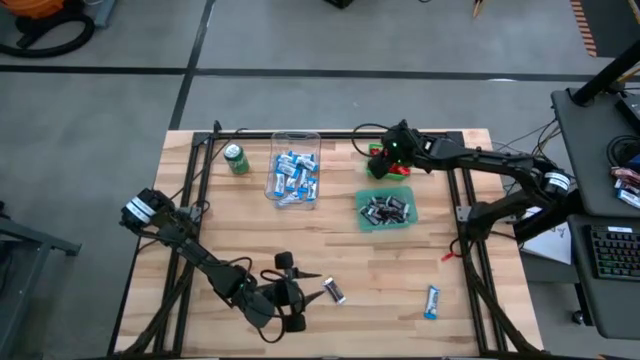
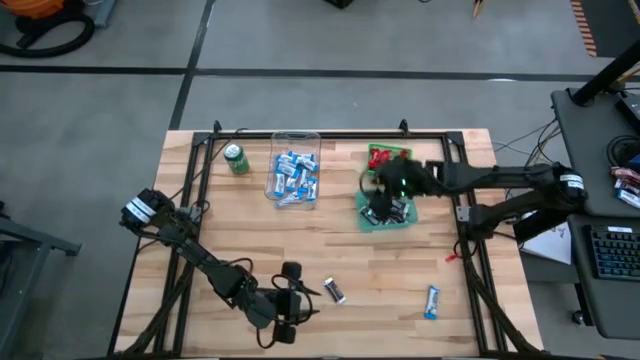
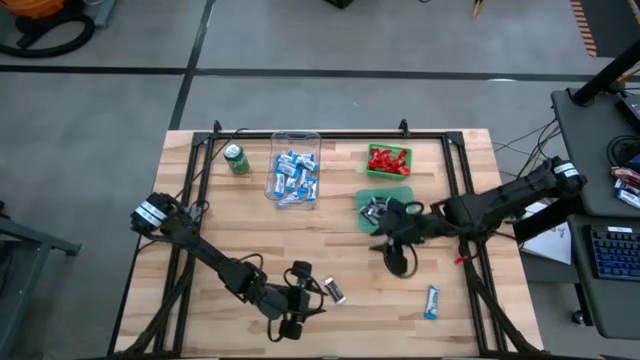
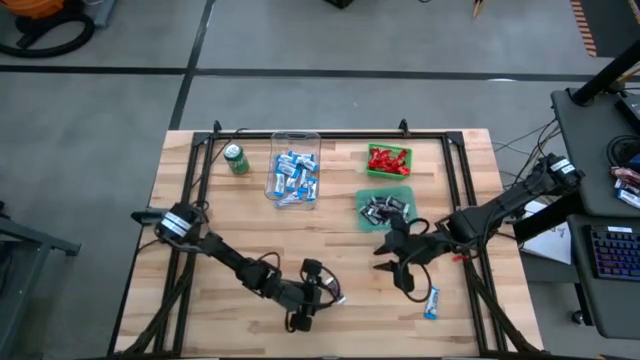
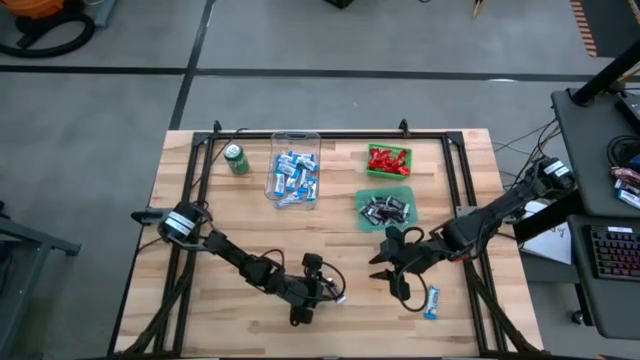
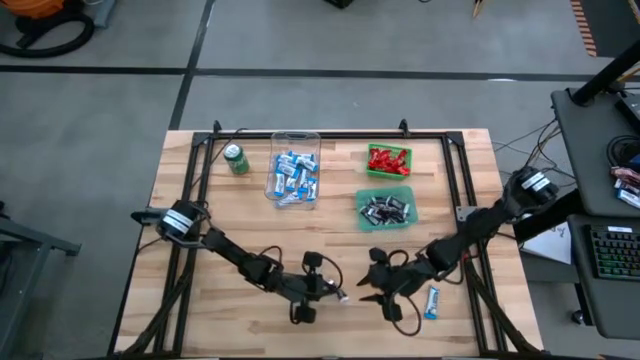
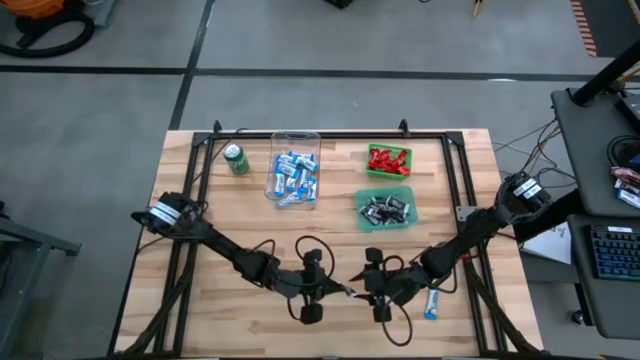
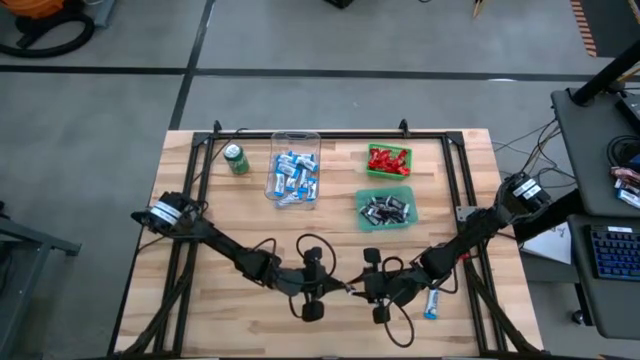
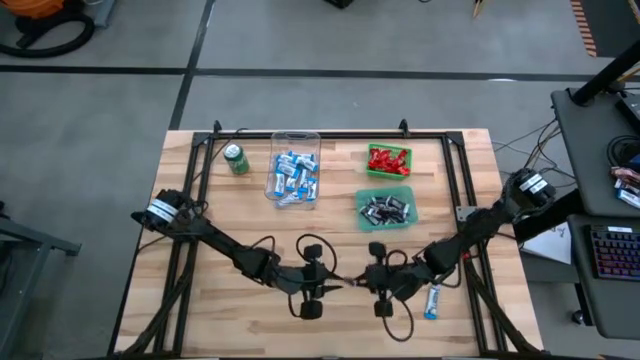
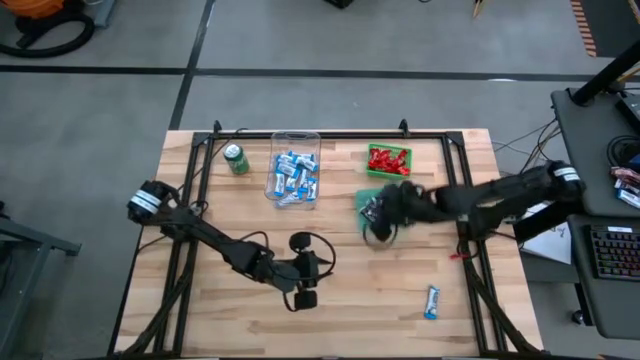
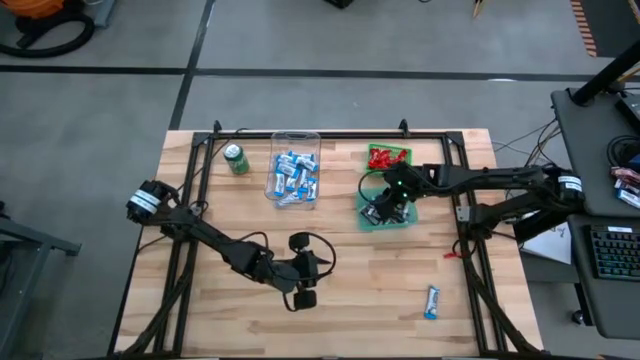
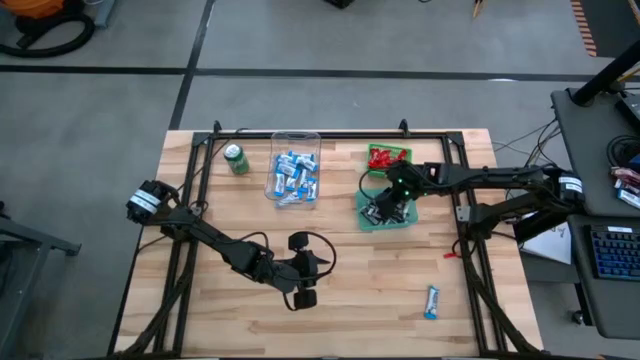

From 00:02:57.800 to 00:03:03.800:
Task: Sort candy
Put the brown candy into the blue bin

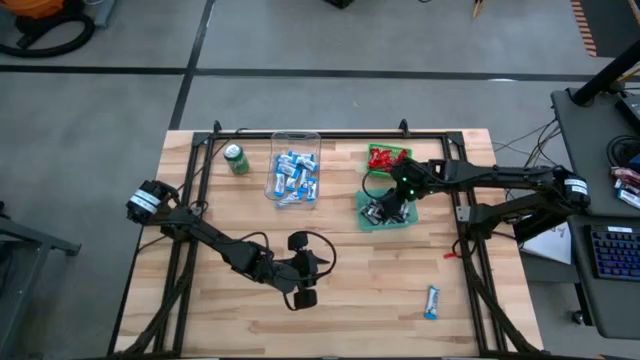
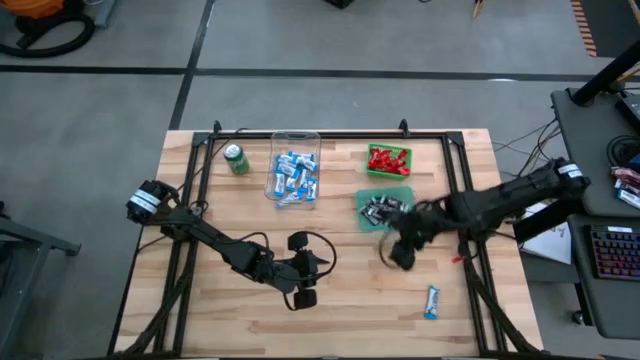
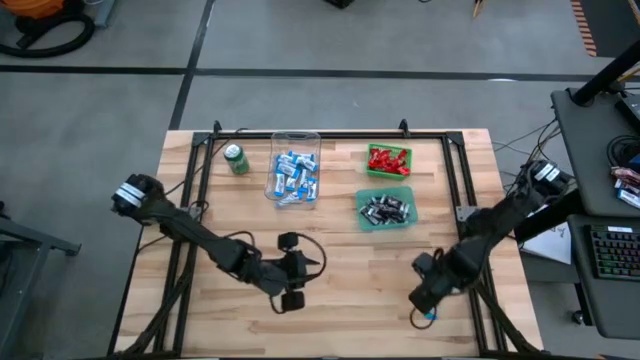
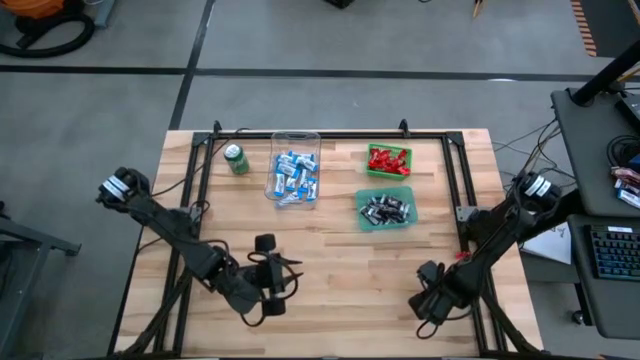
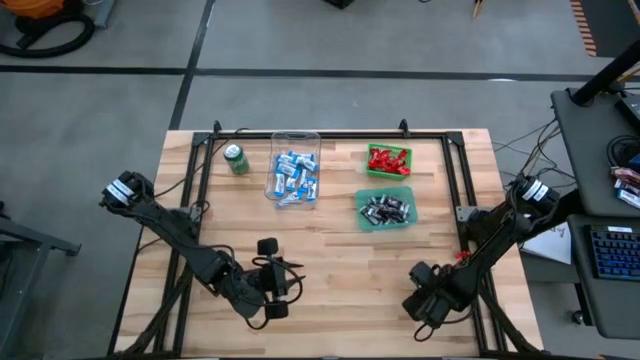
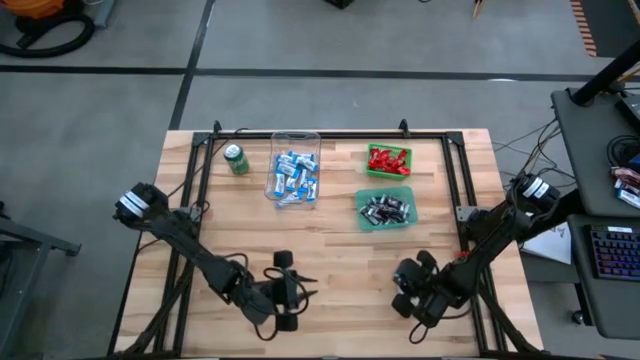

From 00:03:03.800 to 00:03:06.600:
Put the white candy into the transparent bin

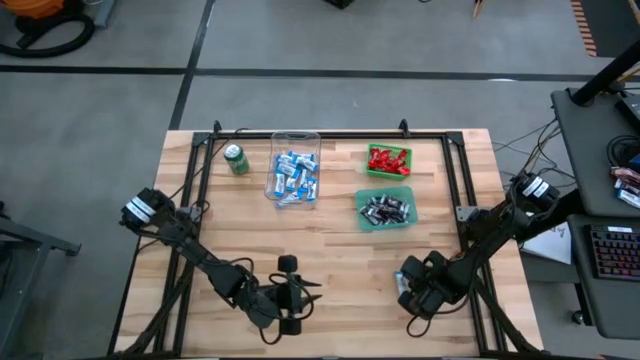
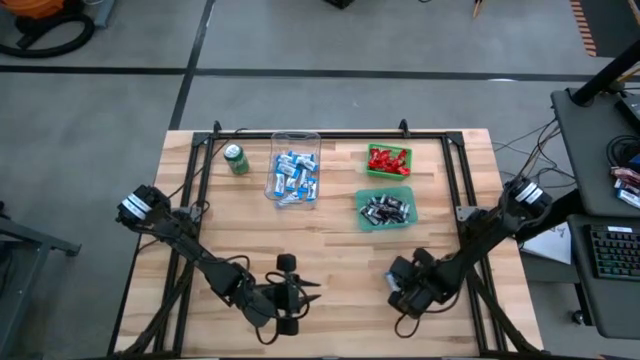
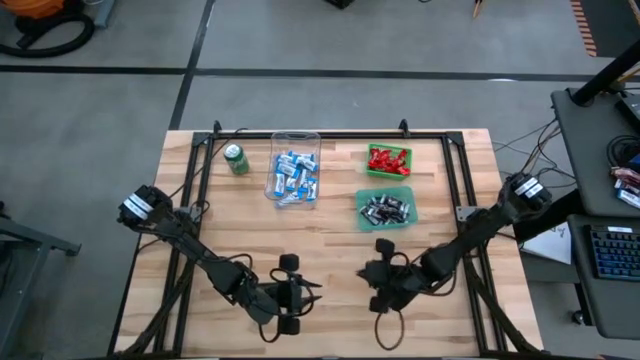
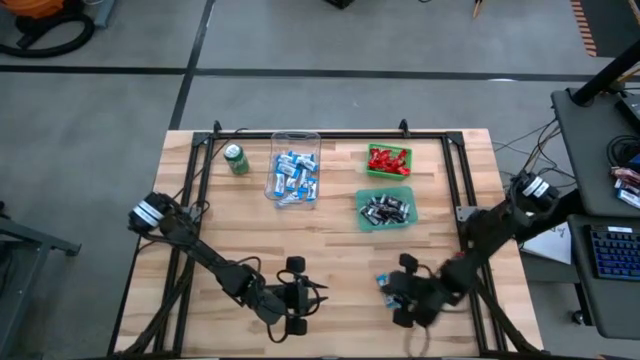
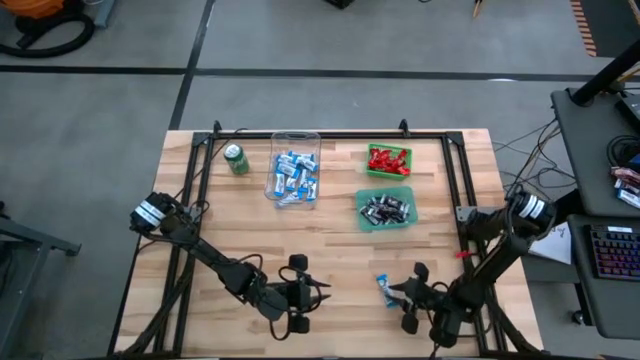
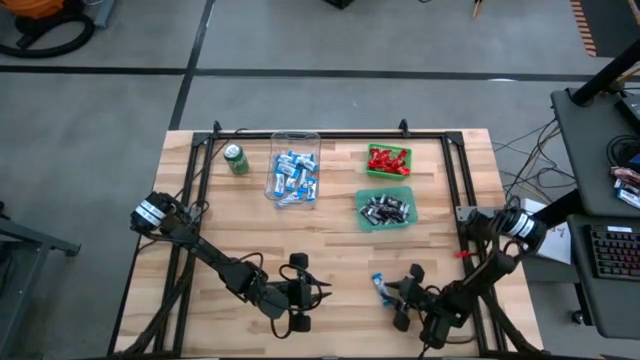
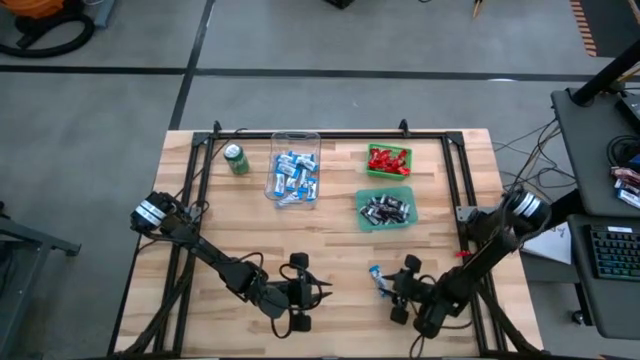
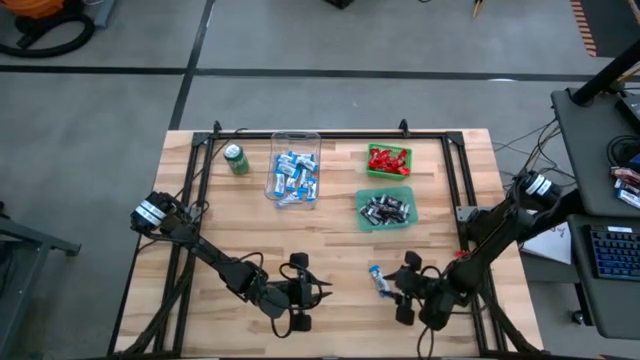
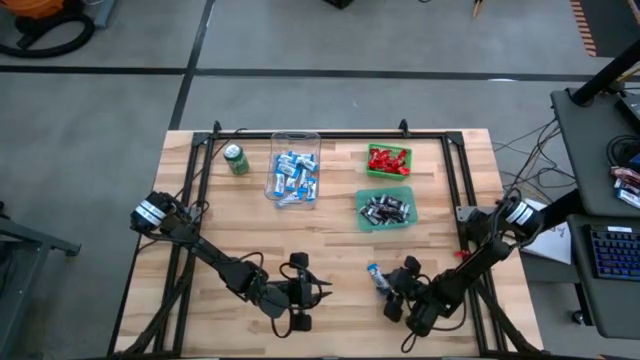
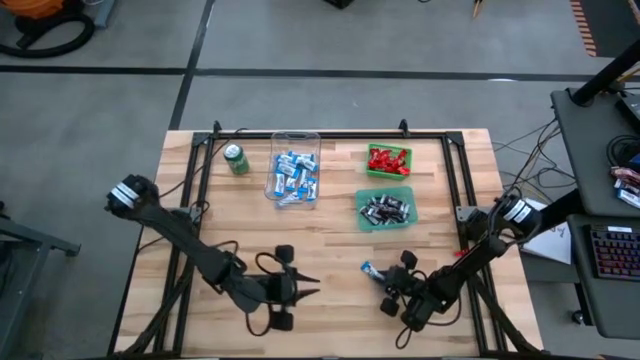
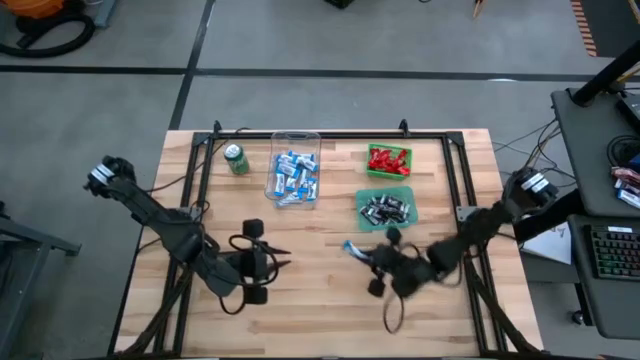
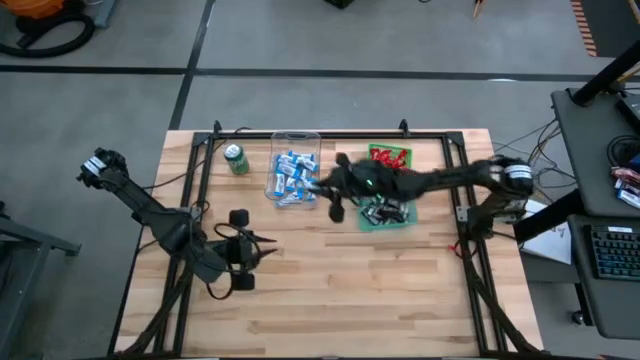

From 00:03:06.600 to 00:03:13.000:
Put the white candy into the transparent bin

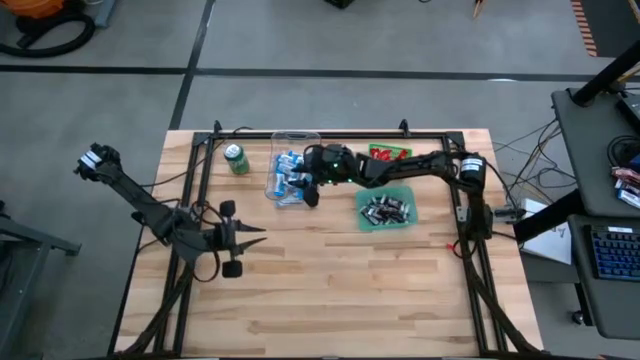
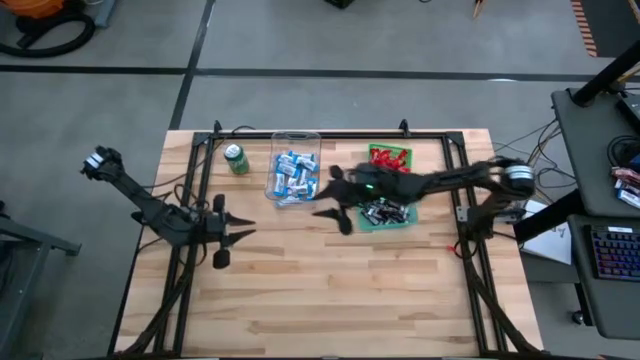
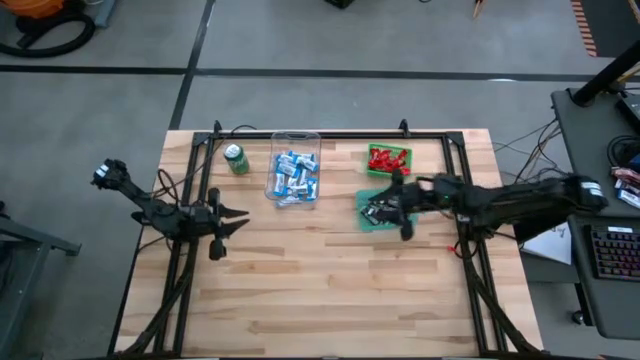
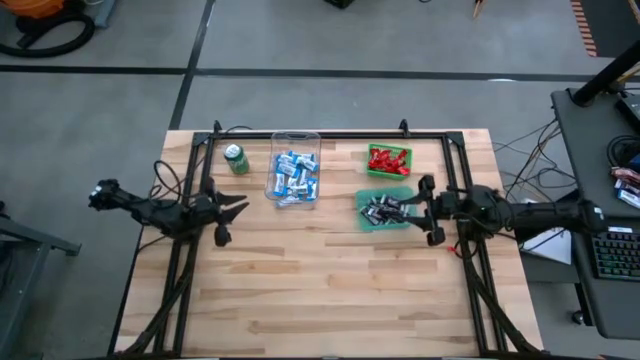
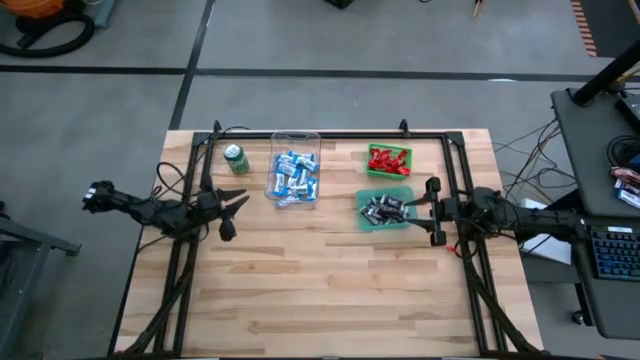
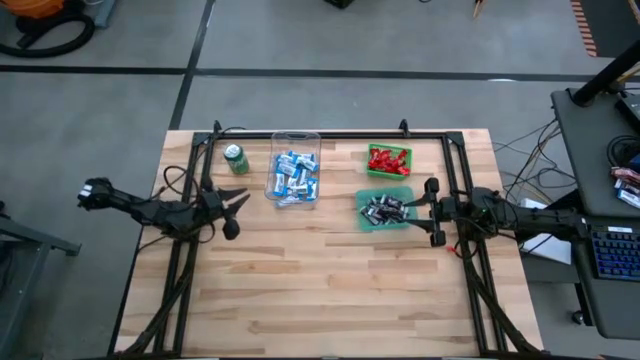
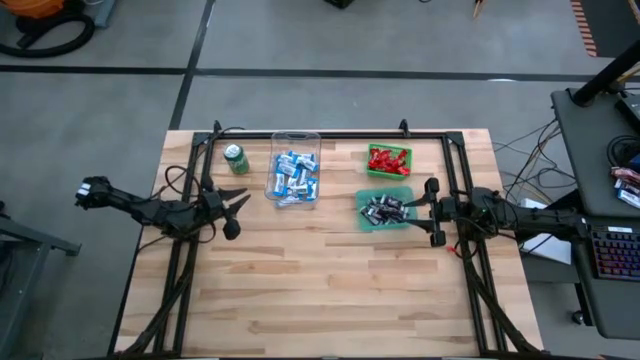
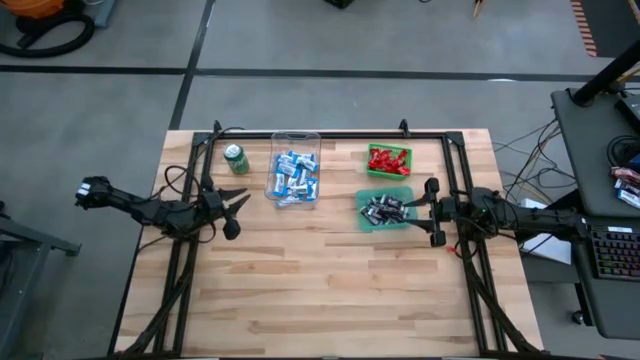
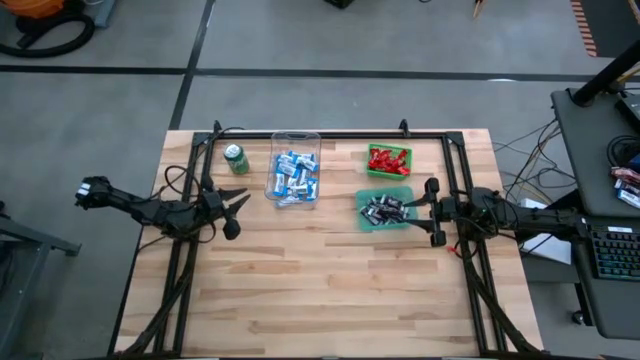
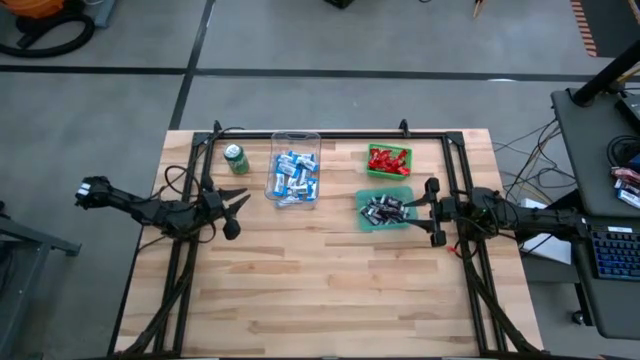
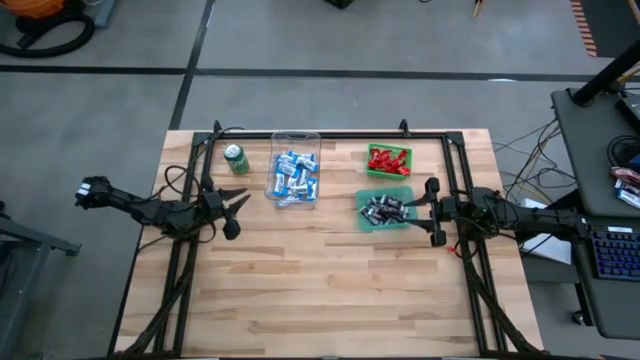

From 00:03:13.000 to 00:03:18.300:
Return to Home Position

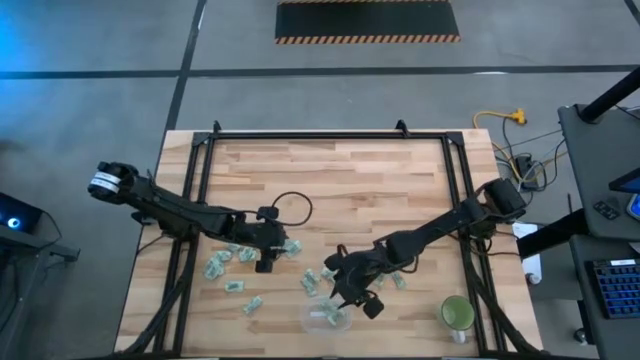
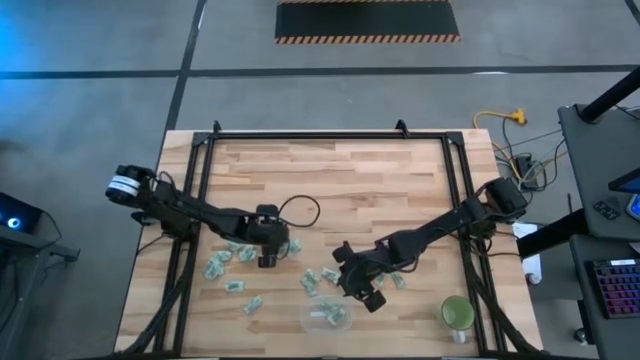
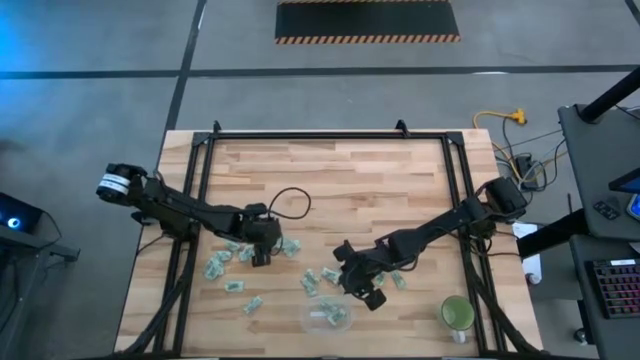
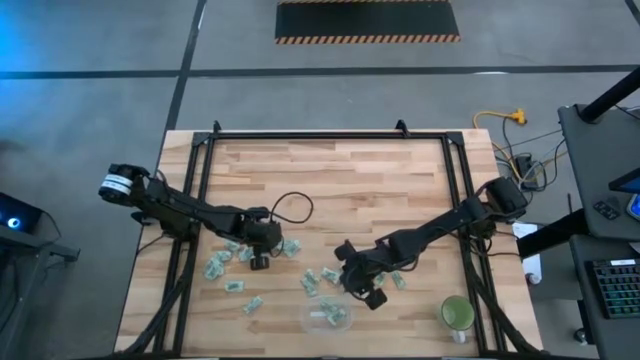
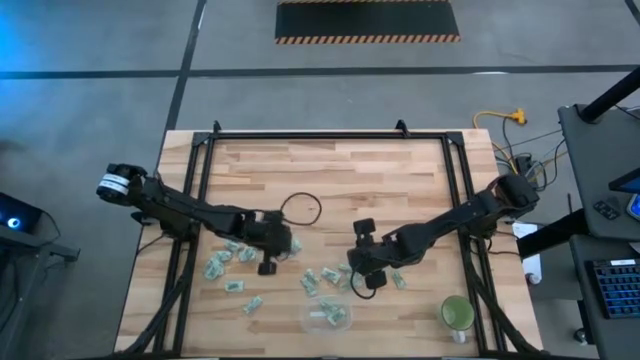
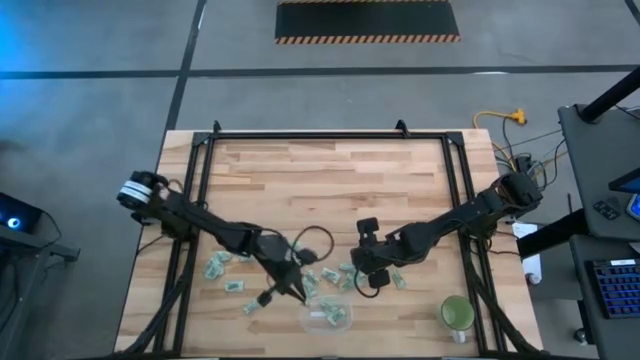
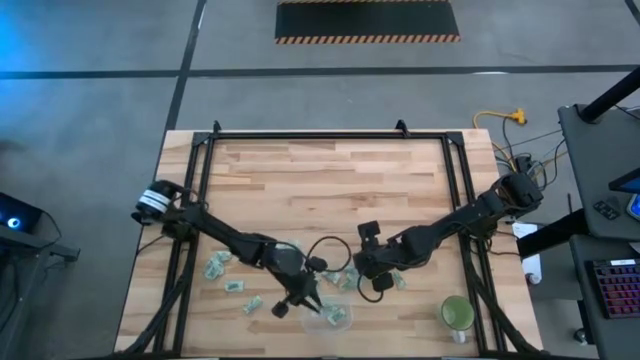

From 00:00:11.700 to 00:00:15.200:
Task: Pick and place Stevia / Truvia into bins
Put the stevia packet into the transparent container
